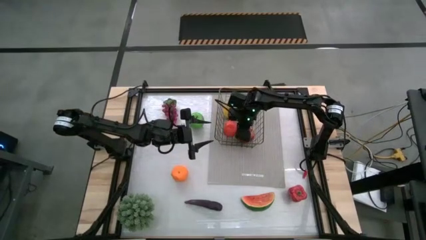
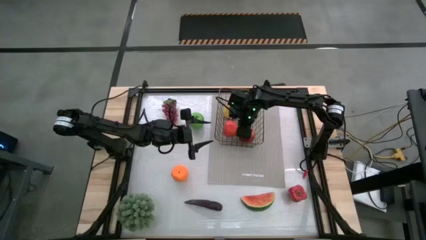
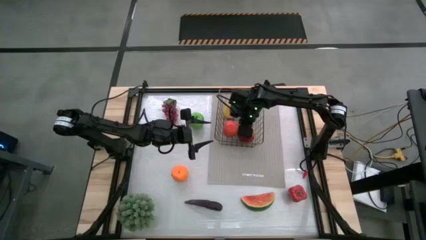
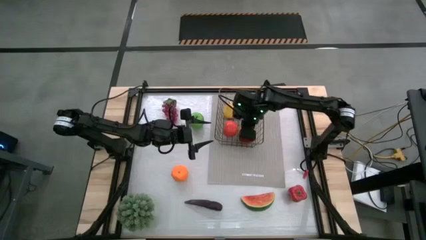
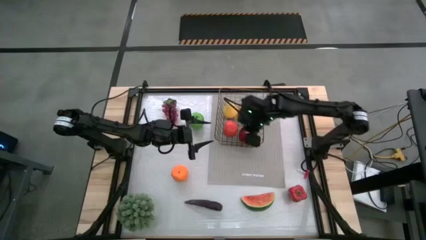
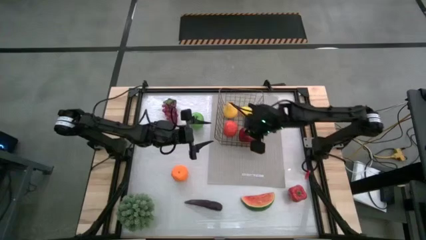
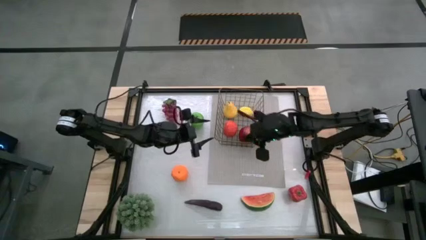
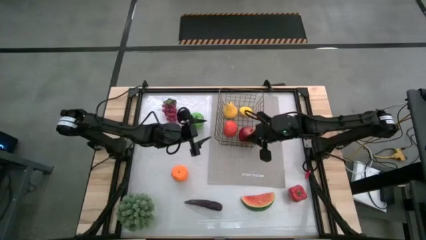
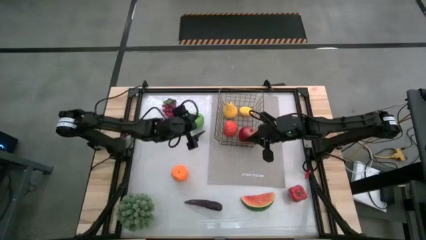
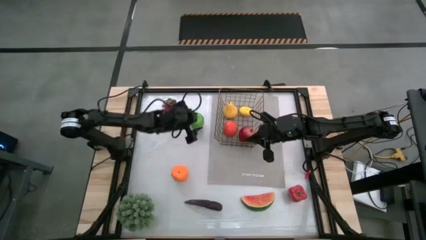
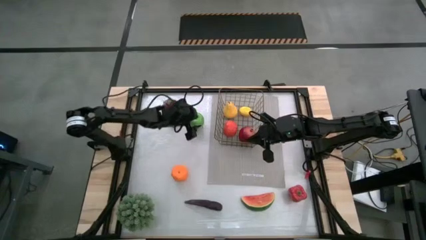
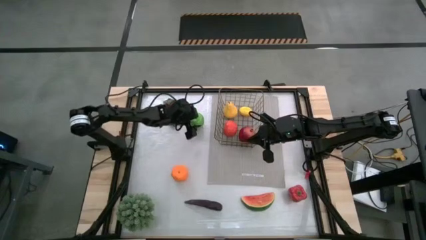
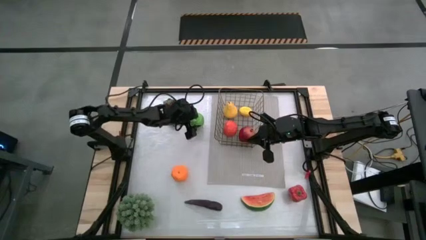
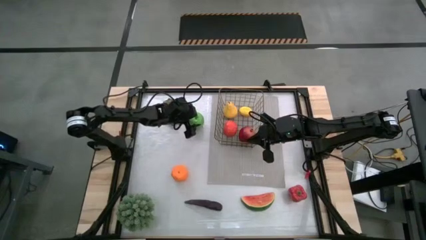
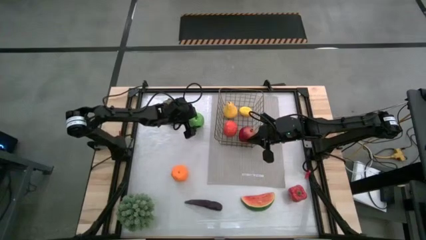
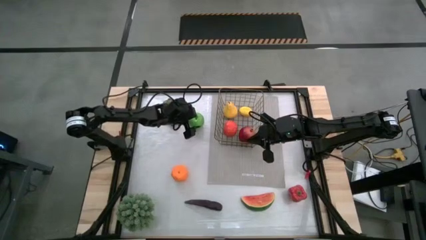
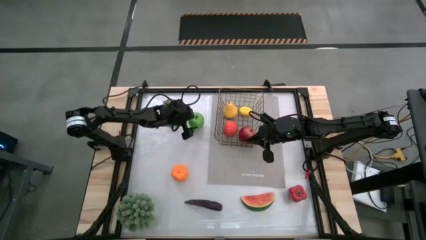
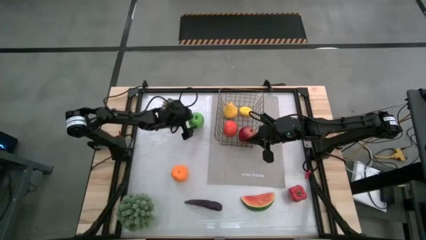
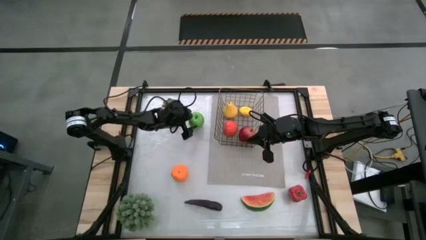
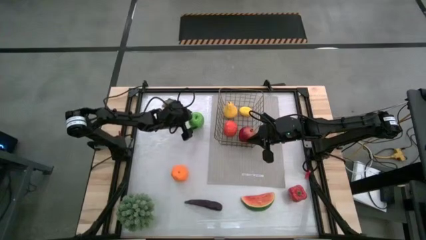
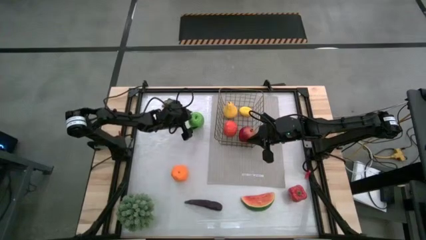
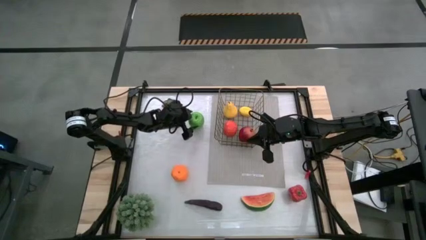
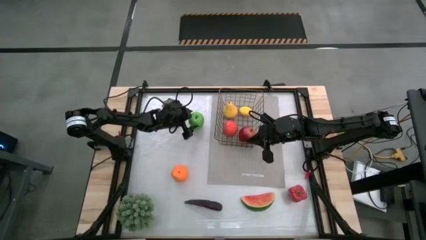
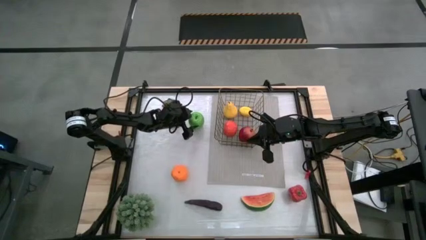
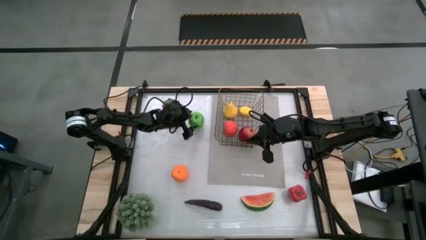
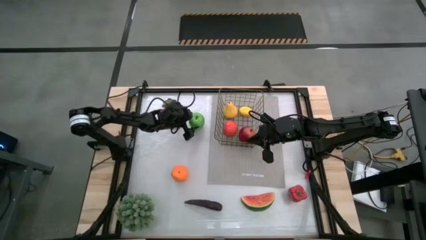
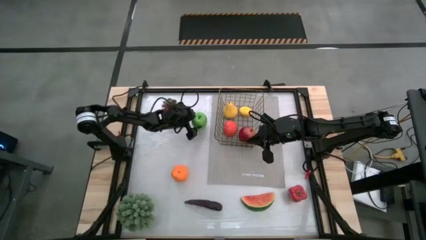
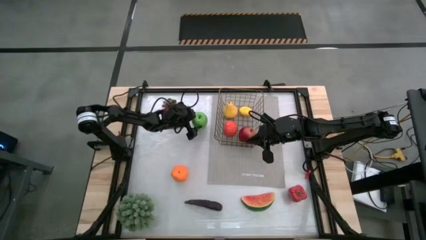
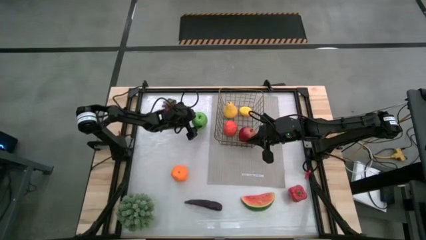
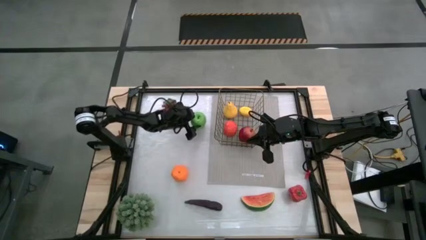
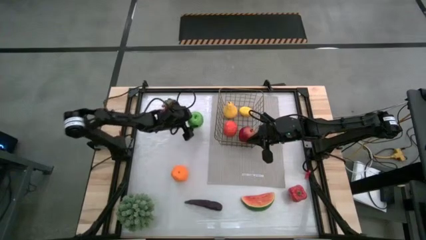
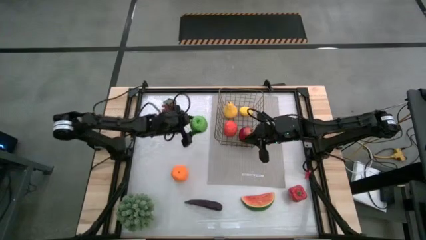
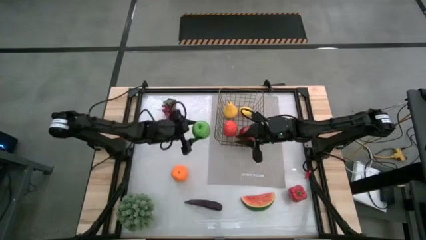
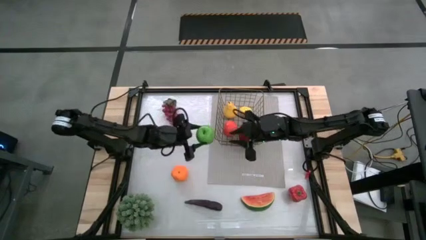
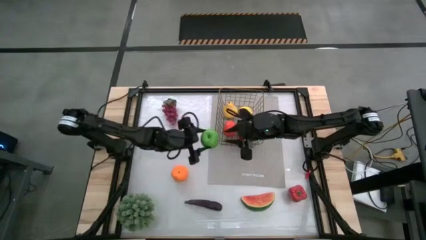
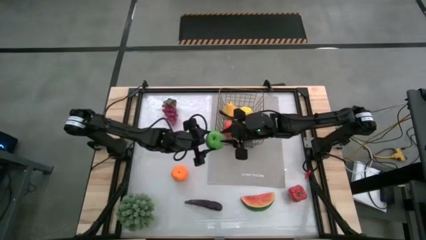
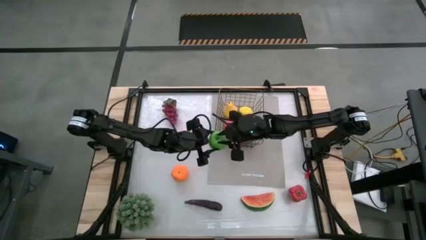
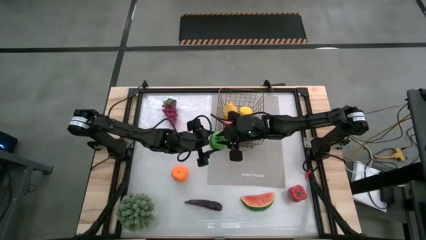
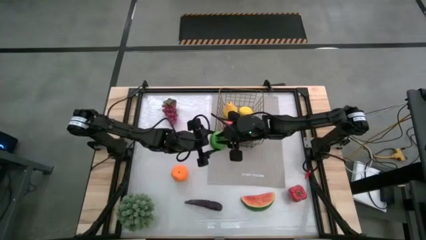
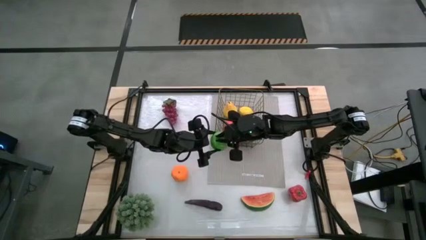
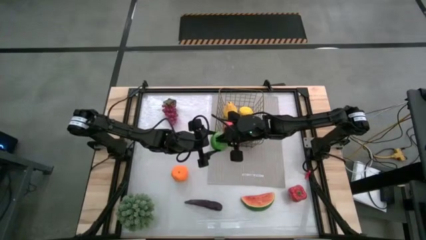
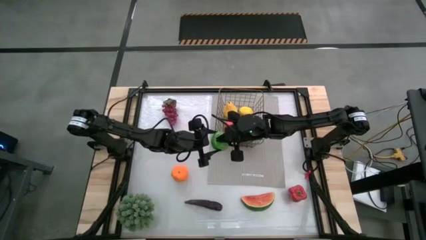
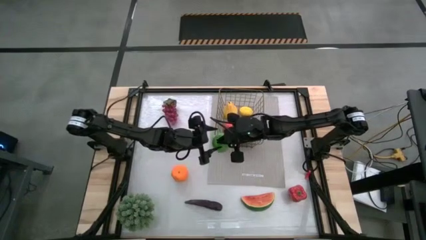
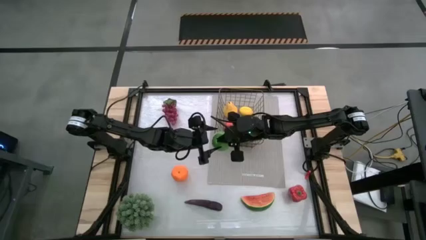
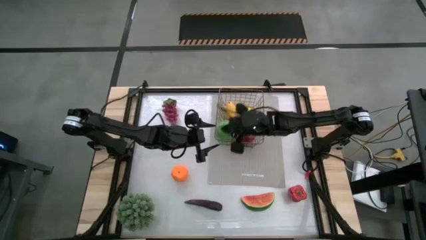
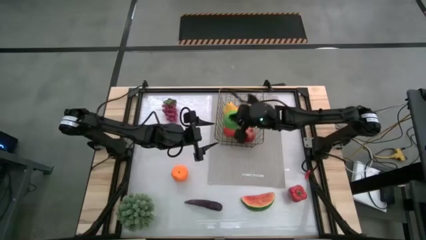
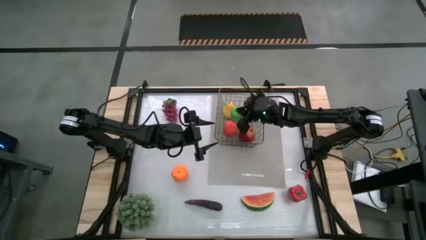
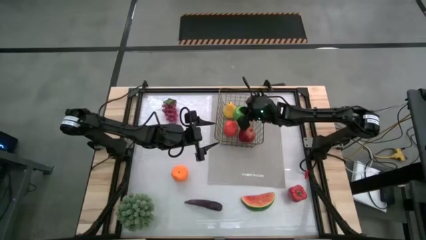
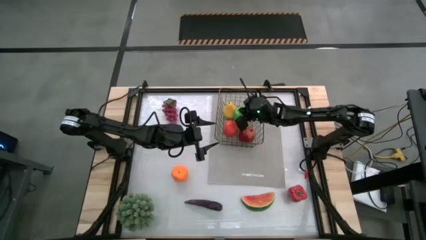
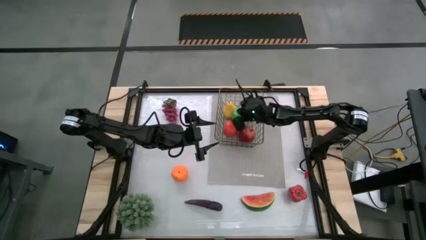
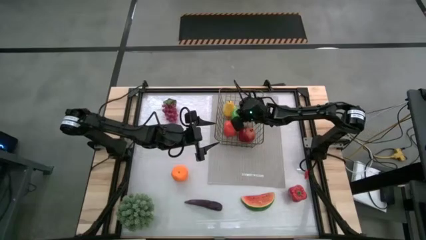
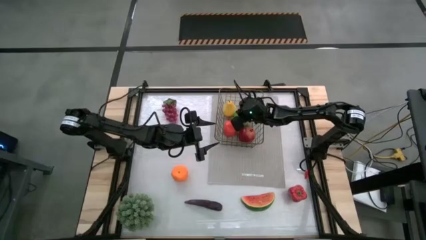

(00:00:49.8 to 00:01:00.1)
Task: Build produce basket
Put the green apple into the wire basket

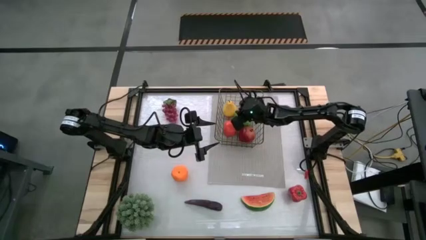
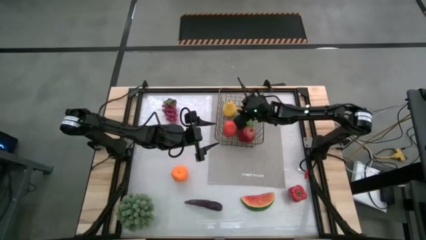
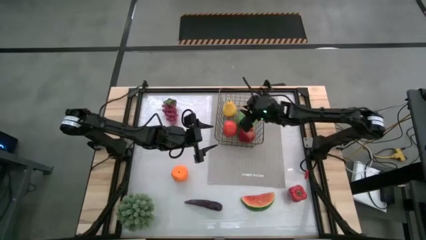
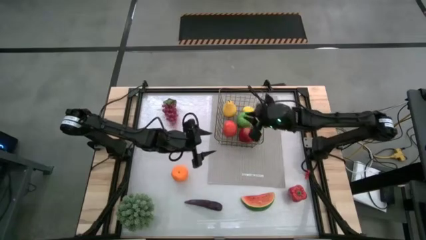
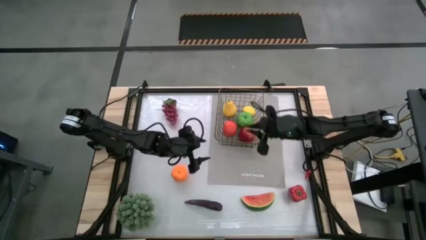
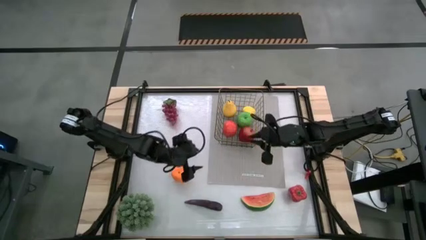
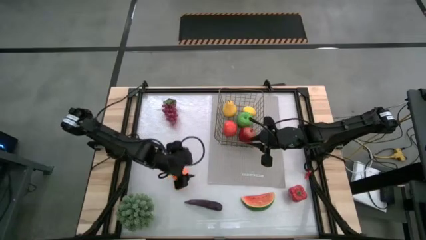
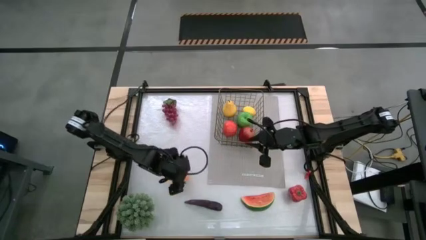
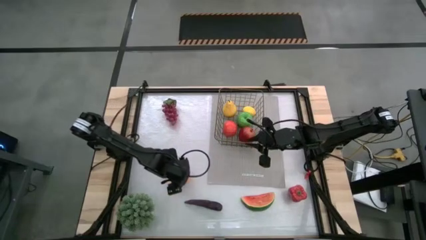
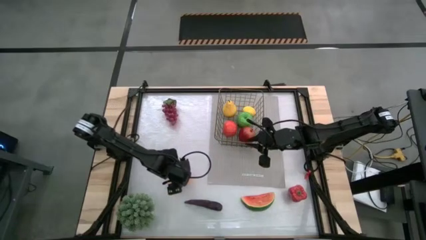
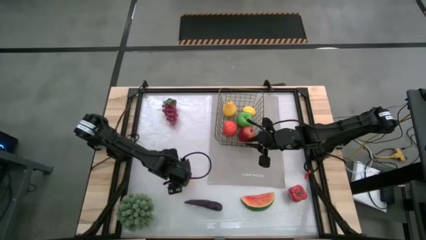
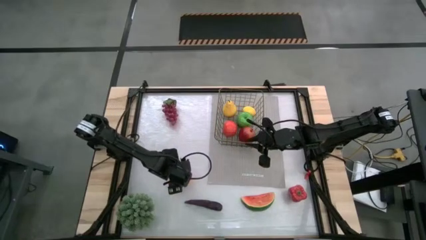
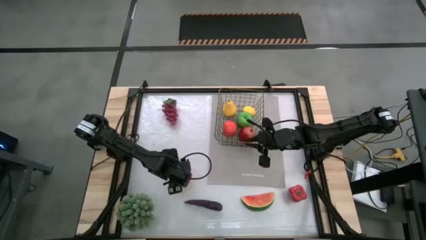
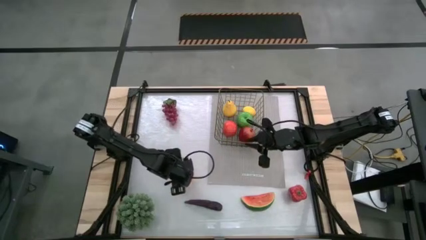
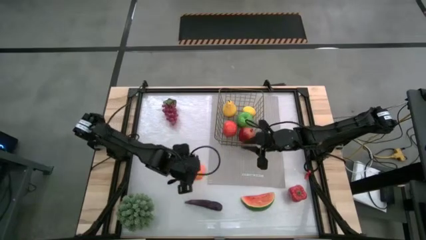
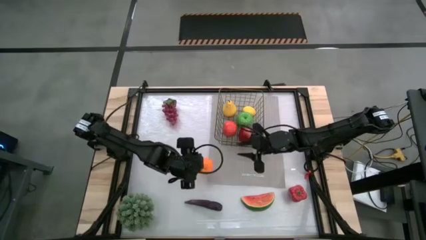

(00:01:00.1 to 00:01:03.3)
Put the orange into the wire basket
